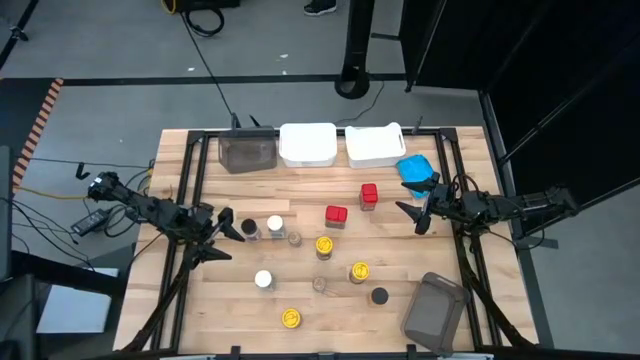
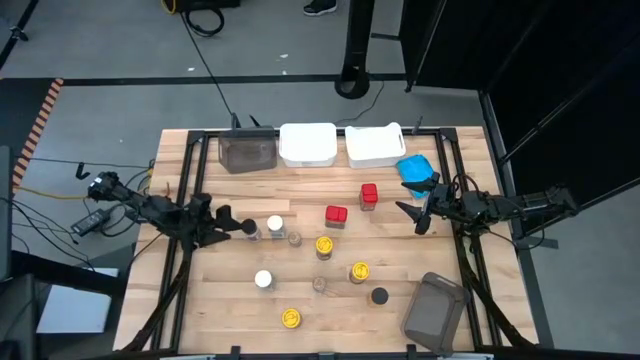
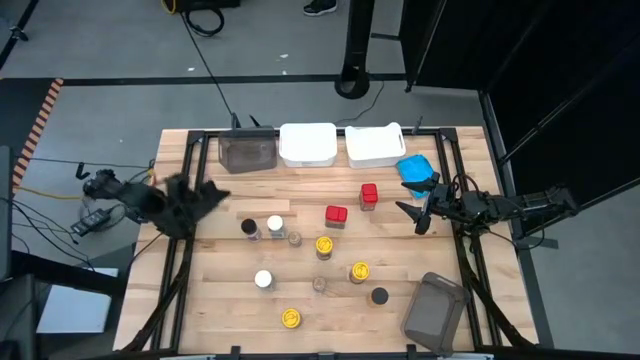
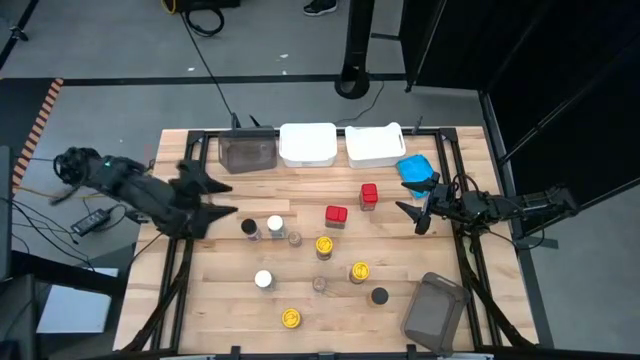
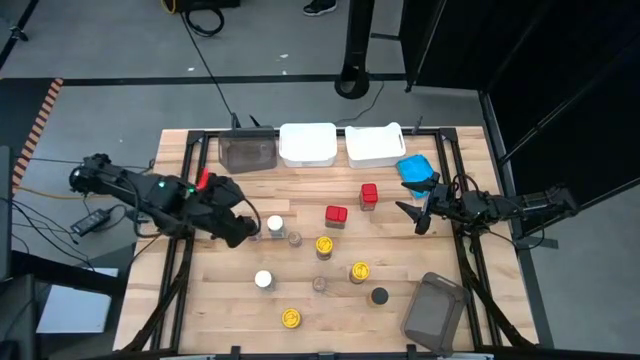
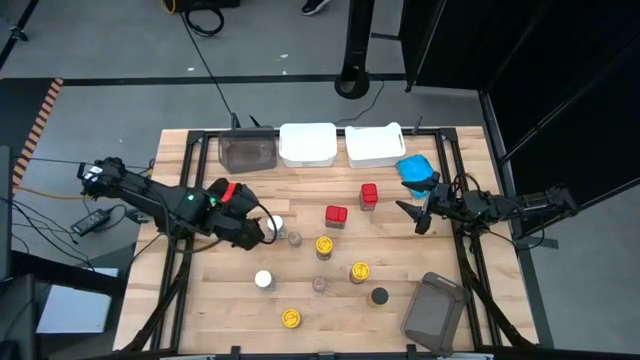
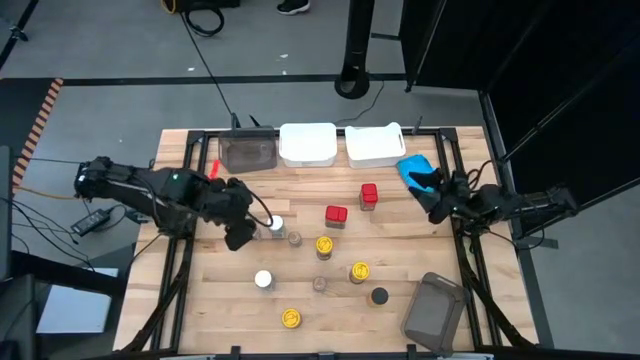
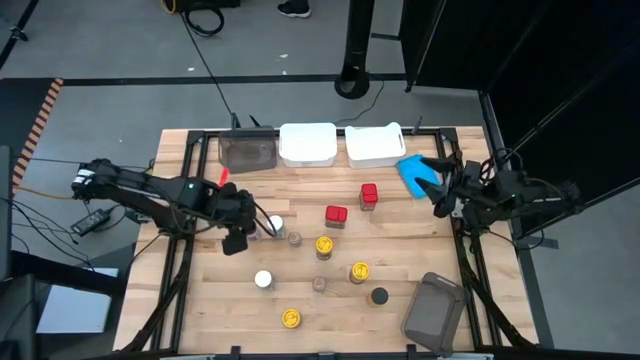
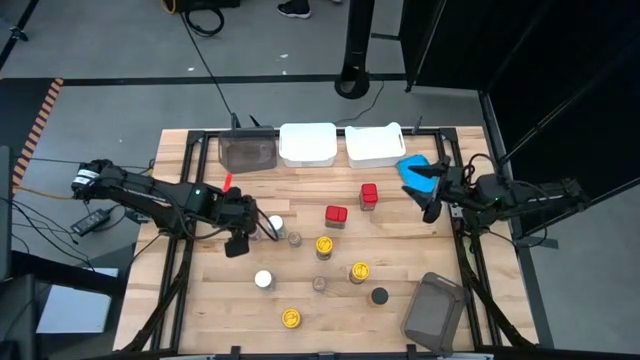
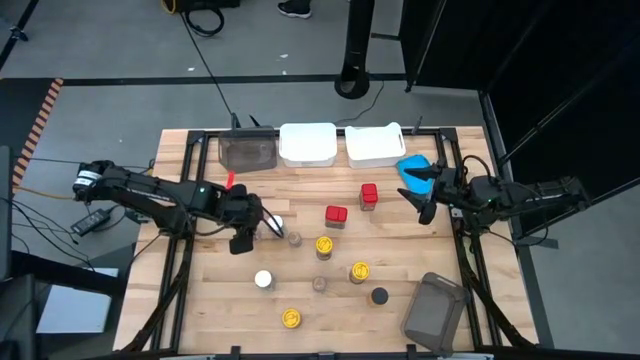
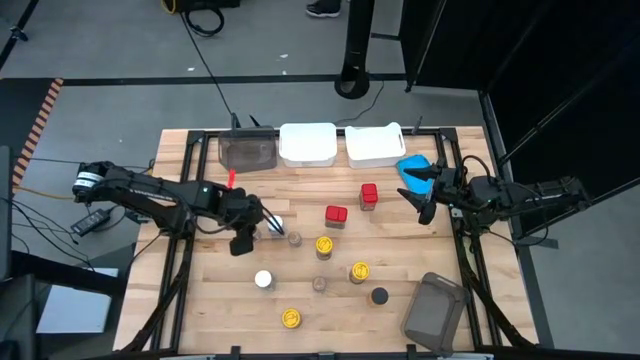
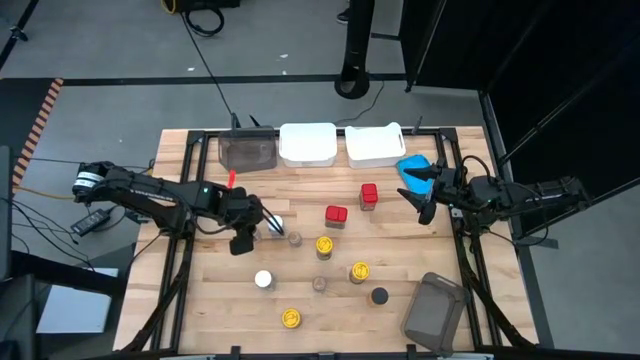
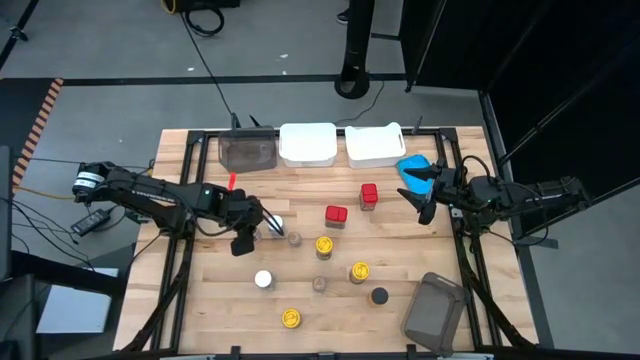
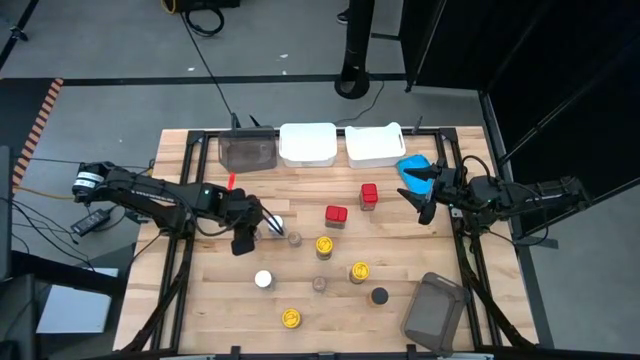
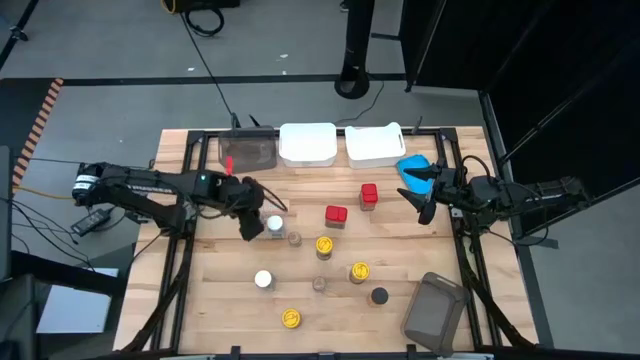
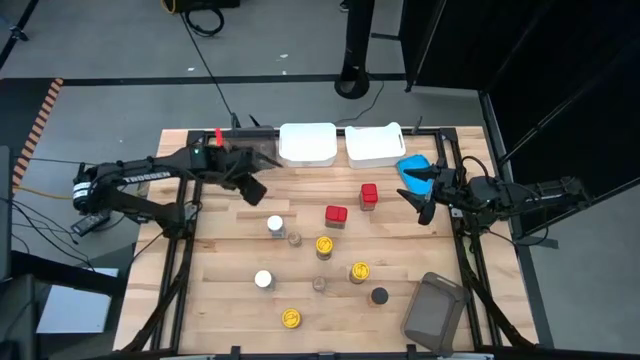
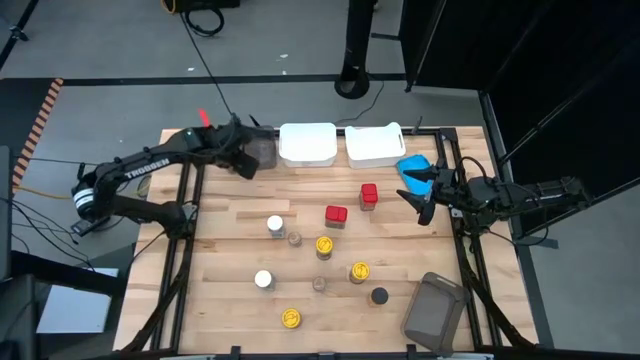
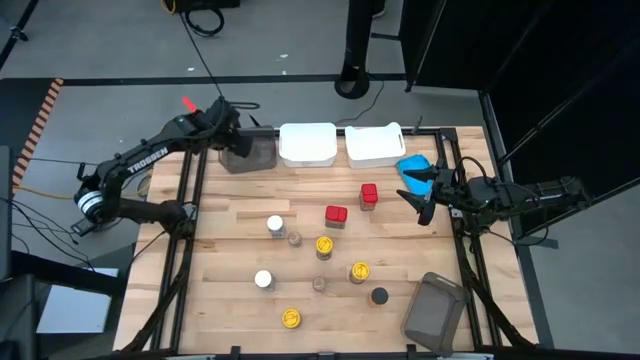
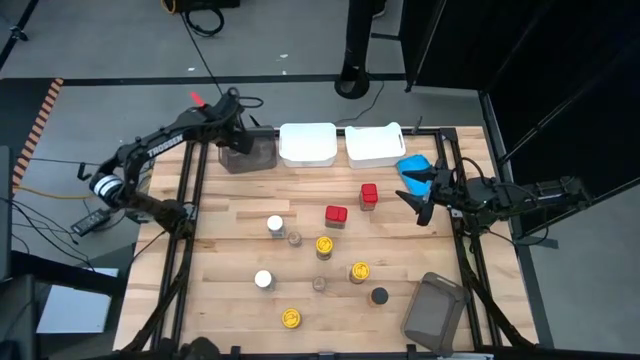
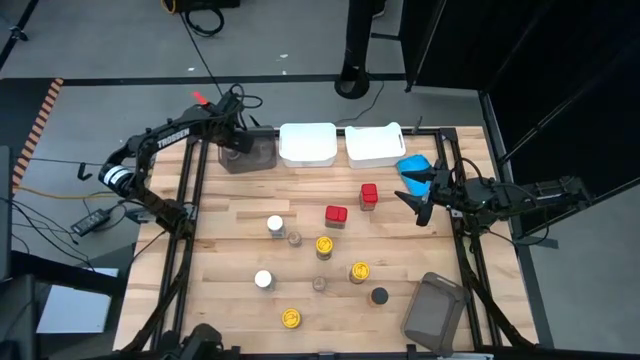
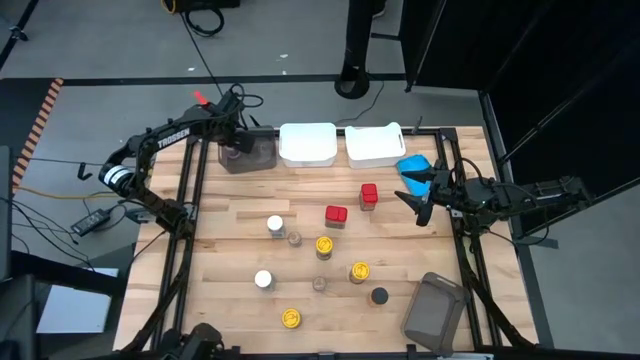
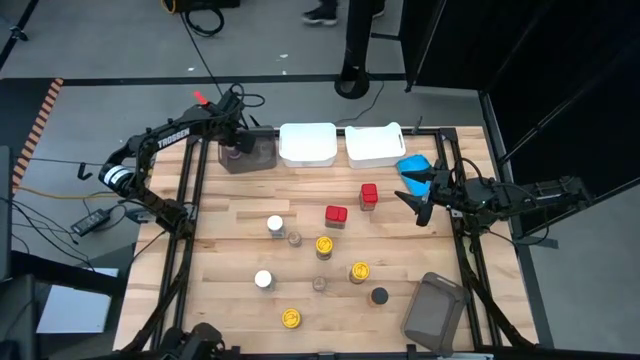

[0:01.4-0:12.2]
Task: Sort spices by type
Put the purple seasoning bottle into the top black bin

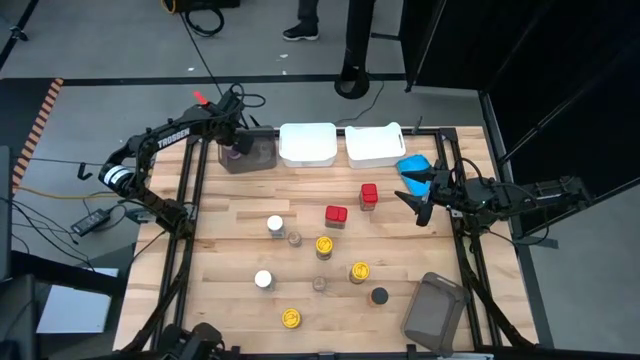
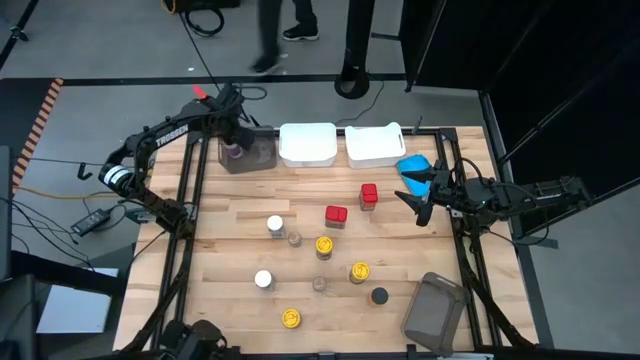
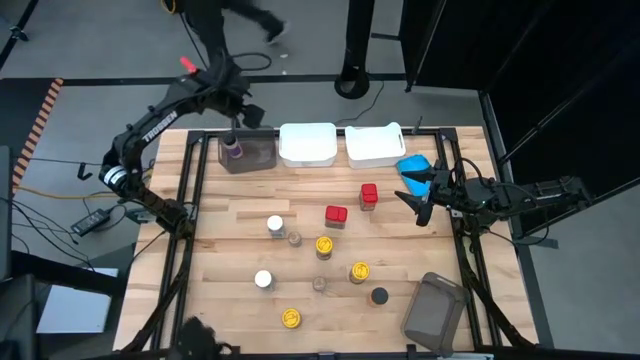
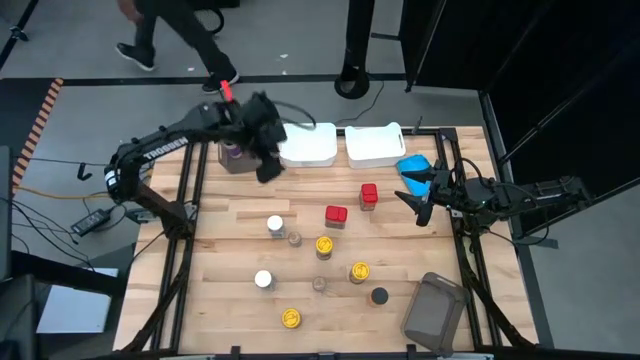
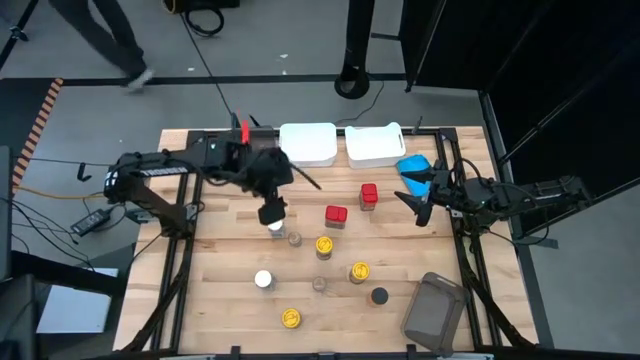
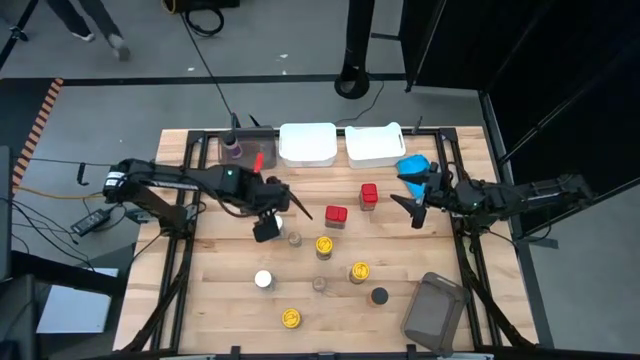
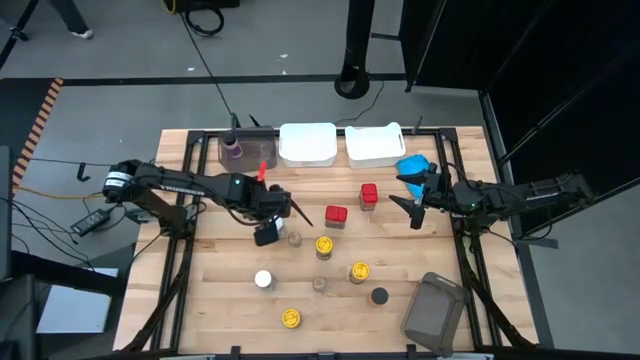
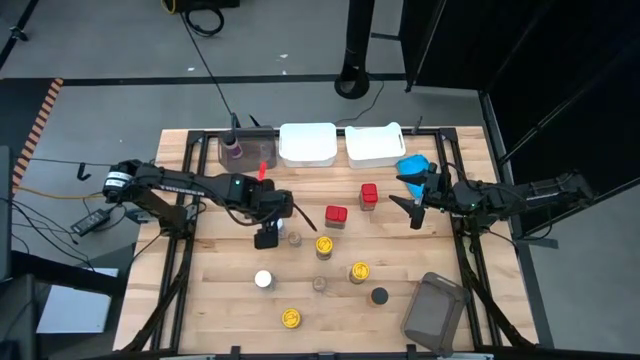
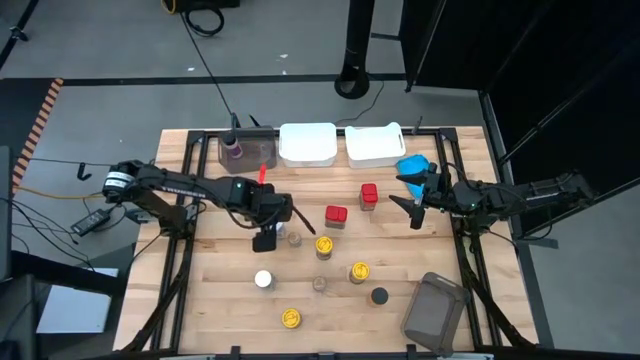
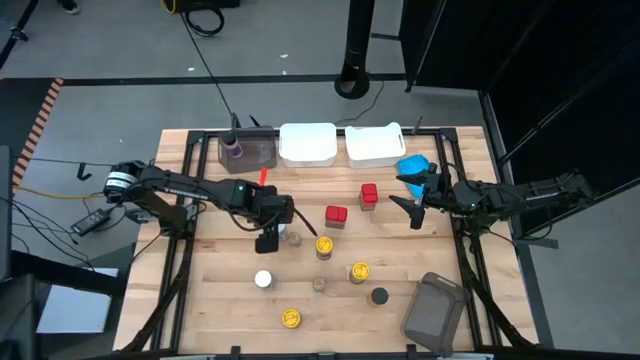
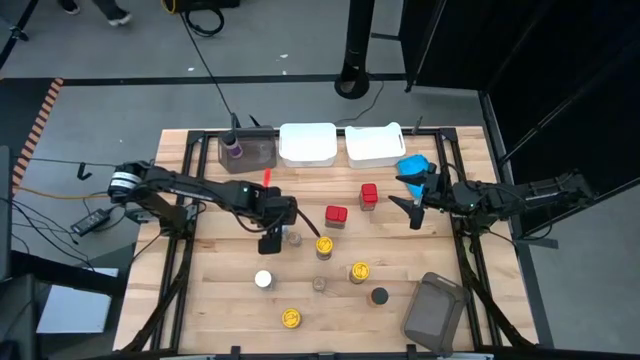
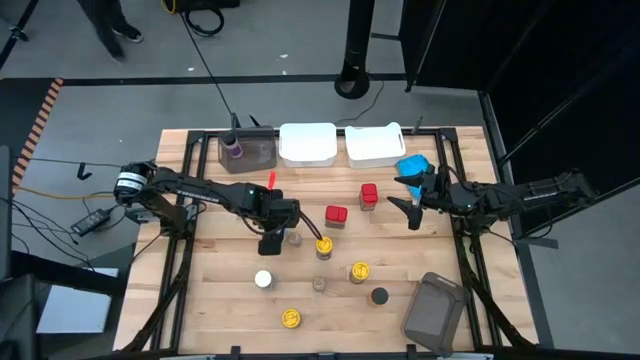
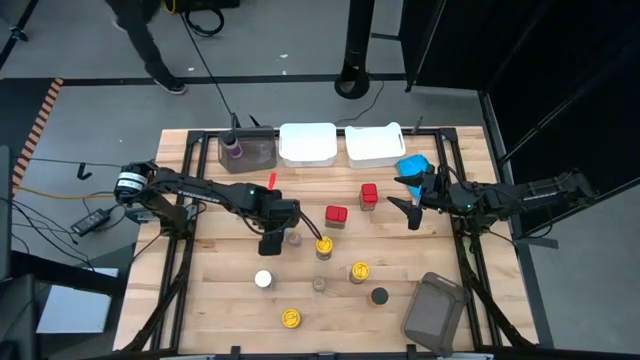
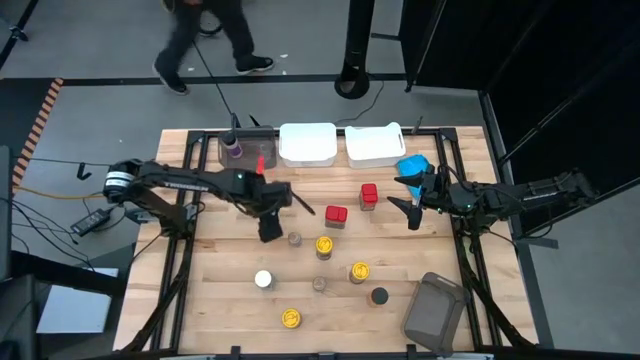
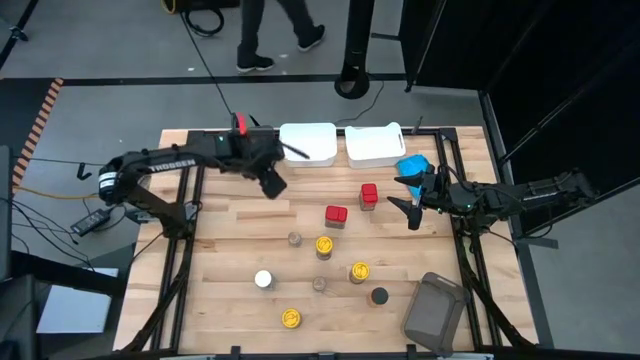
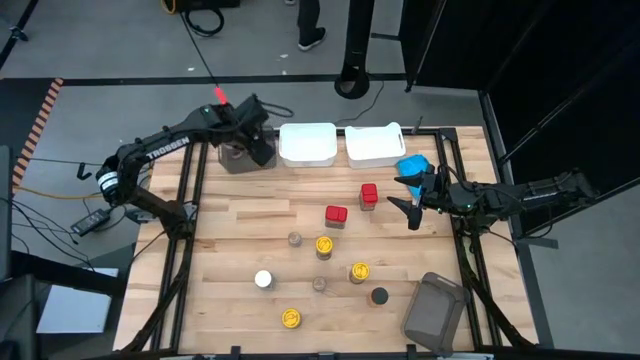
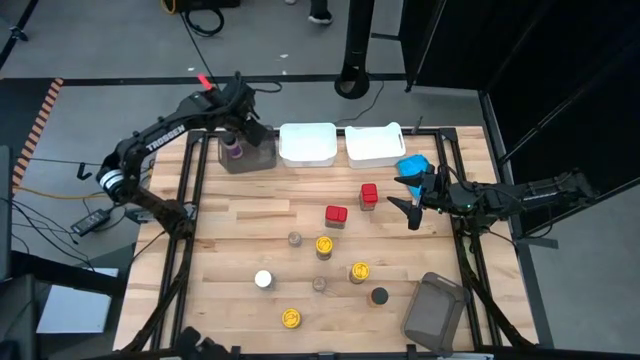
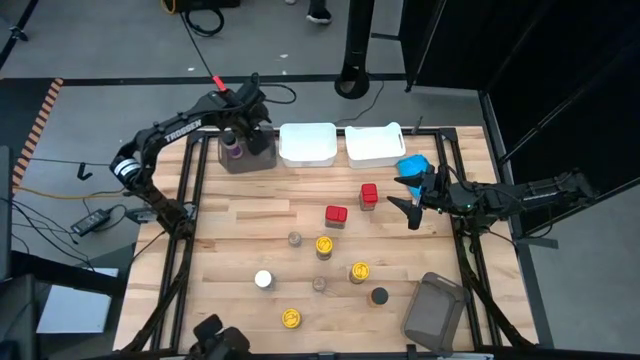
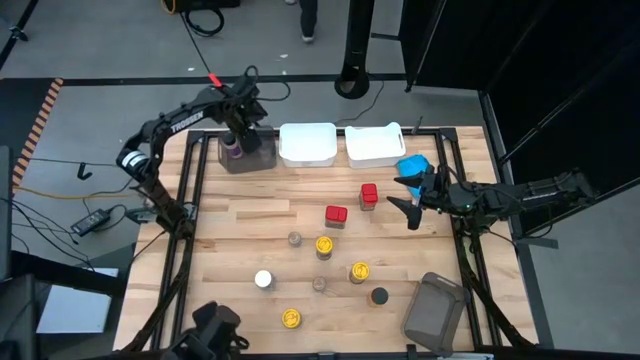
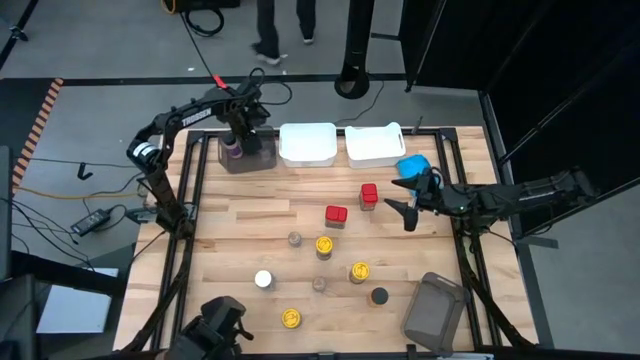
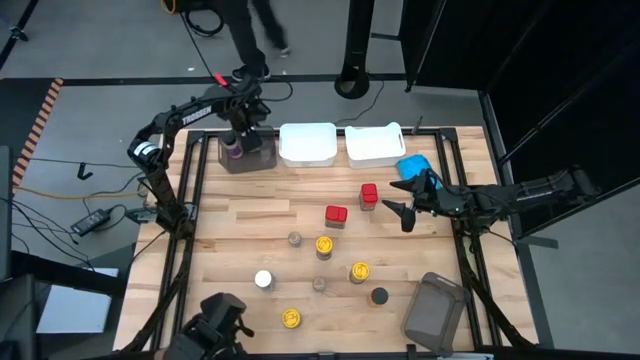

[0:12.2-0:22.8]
Put the top white seasoning bottle into the black bin
